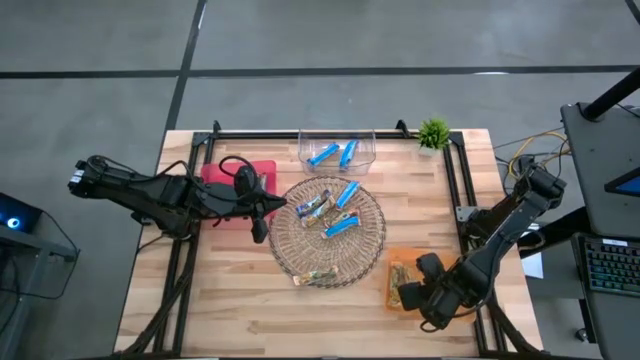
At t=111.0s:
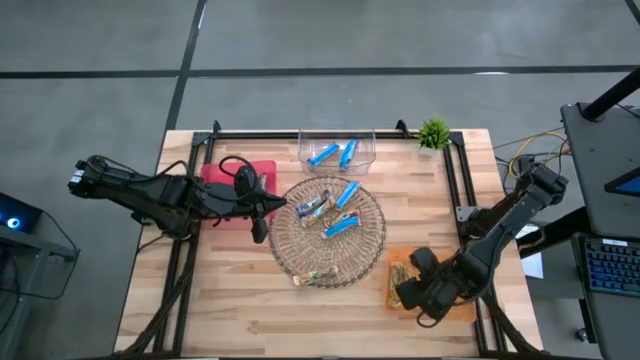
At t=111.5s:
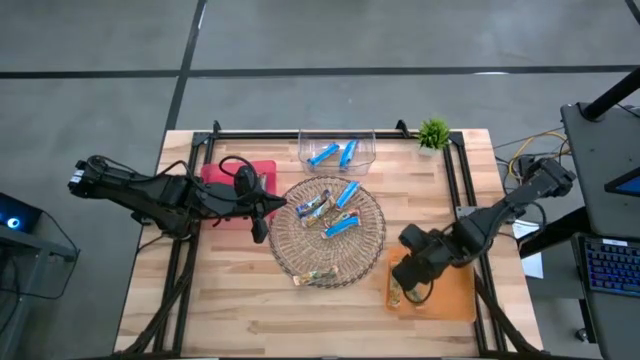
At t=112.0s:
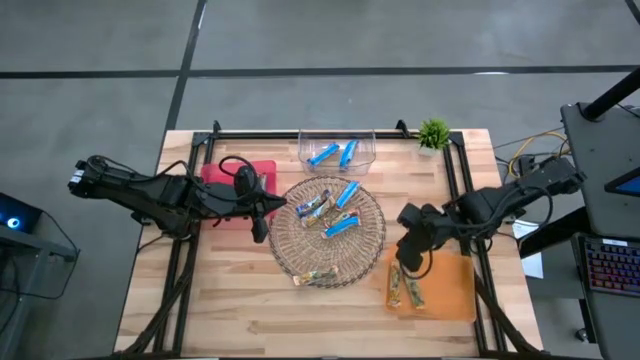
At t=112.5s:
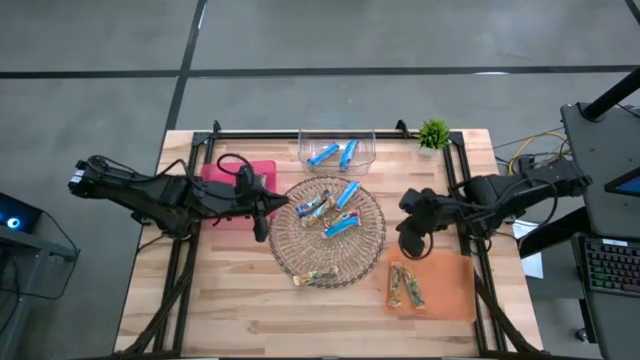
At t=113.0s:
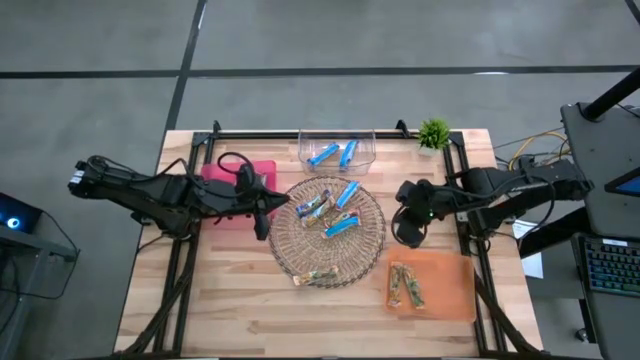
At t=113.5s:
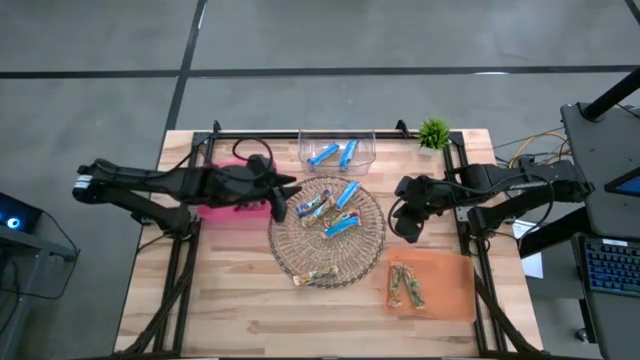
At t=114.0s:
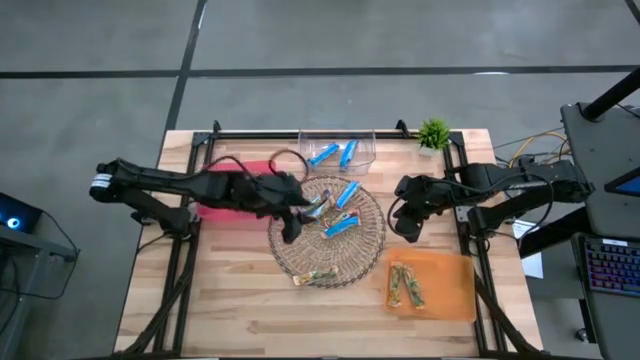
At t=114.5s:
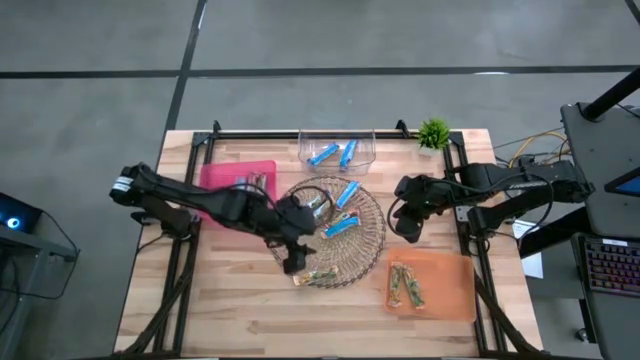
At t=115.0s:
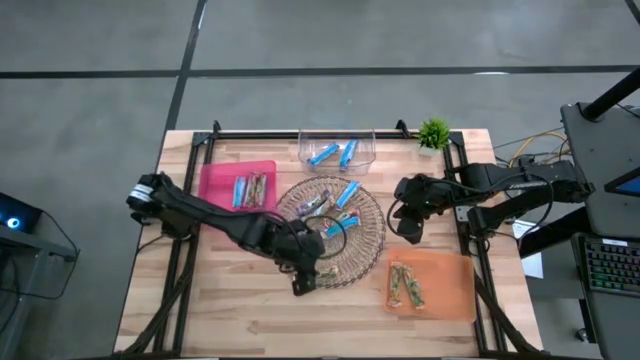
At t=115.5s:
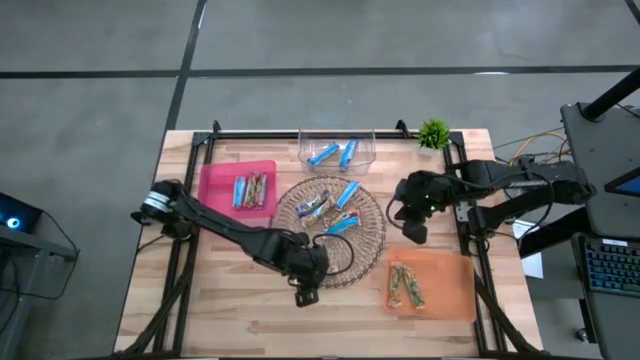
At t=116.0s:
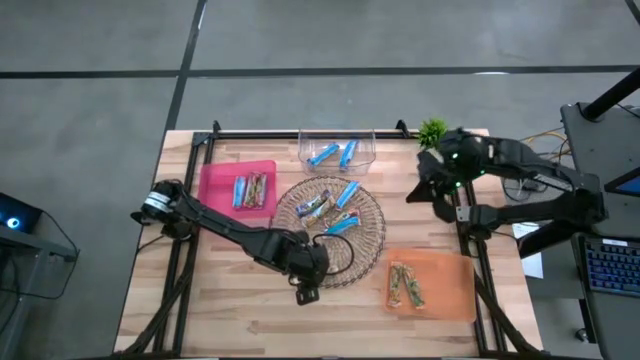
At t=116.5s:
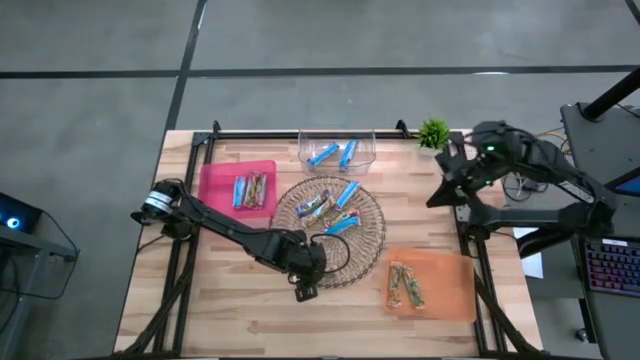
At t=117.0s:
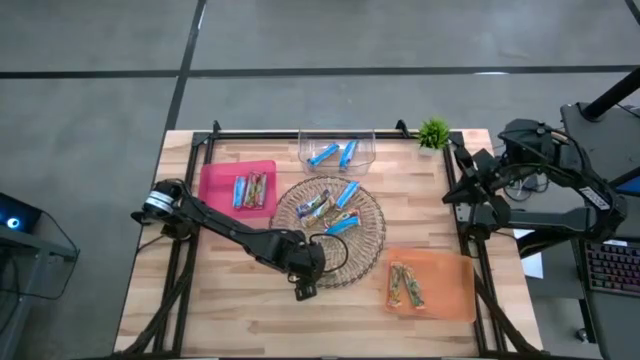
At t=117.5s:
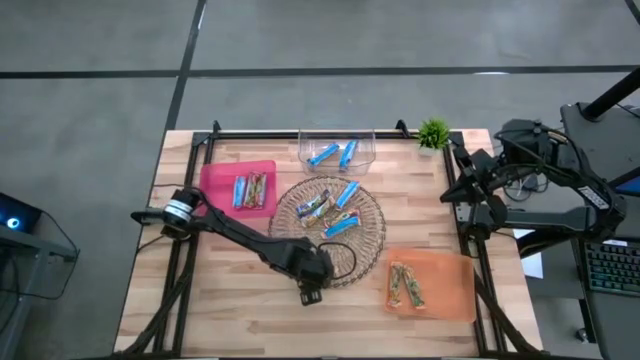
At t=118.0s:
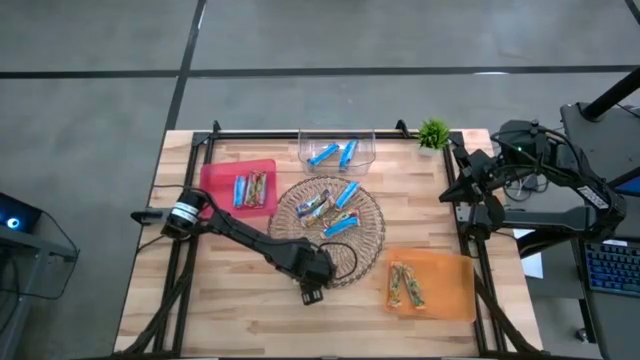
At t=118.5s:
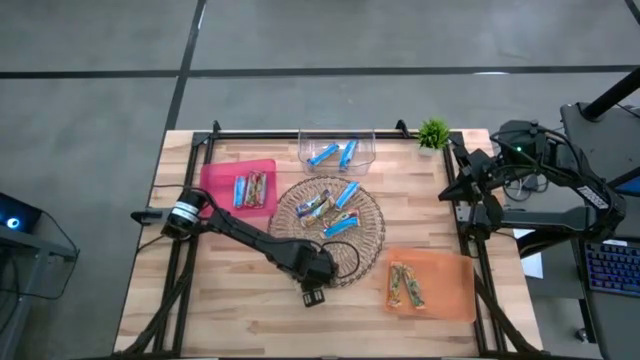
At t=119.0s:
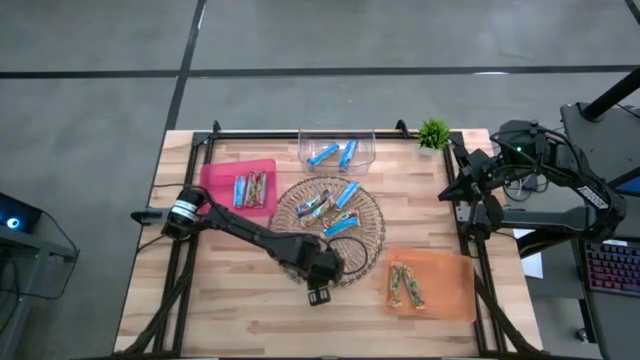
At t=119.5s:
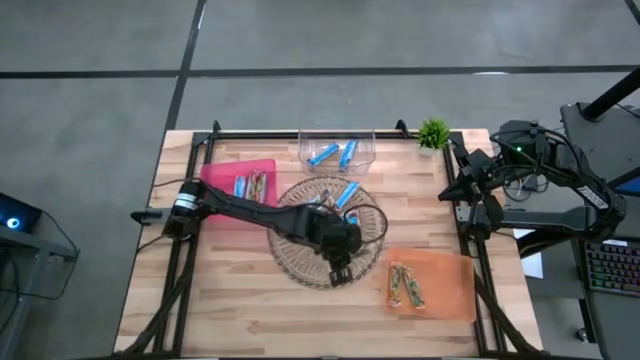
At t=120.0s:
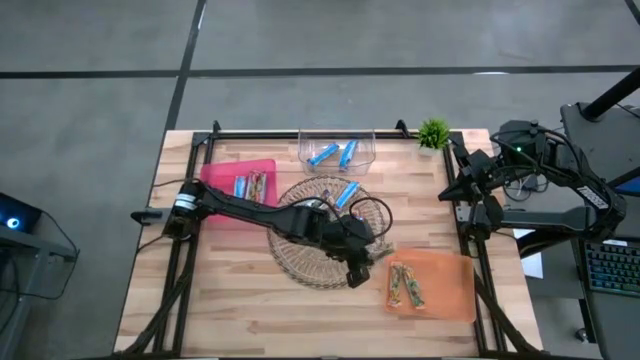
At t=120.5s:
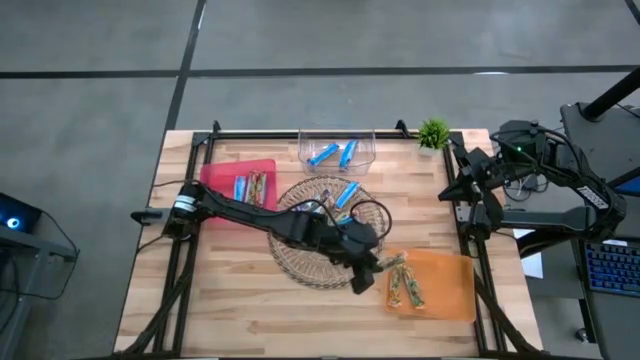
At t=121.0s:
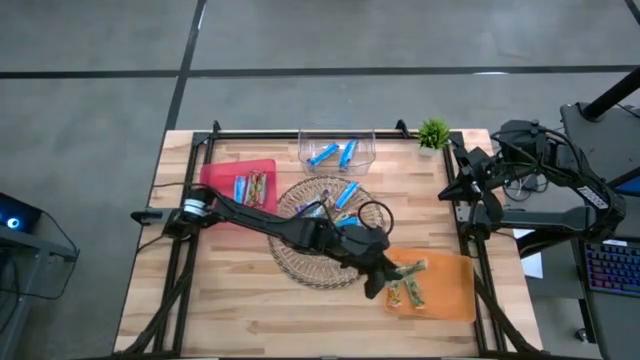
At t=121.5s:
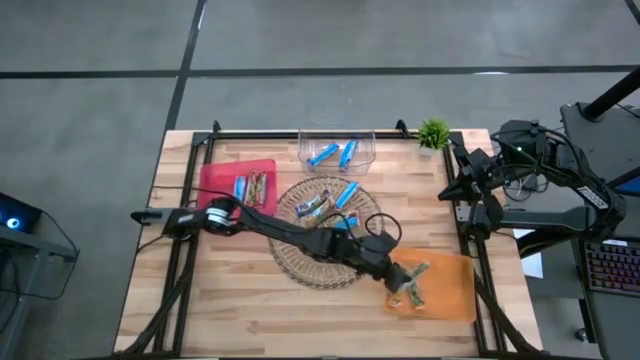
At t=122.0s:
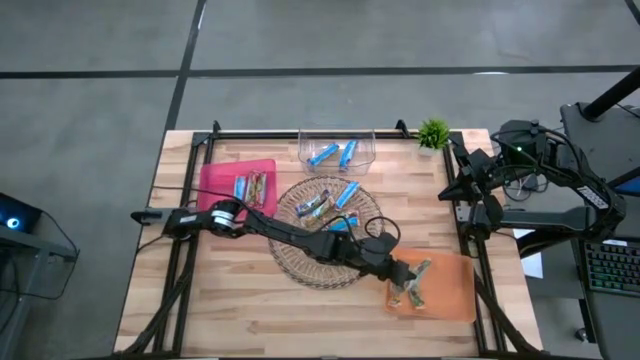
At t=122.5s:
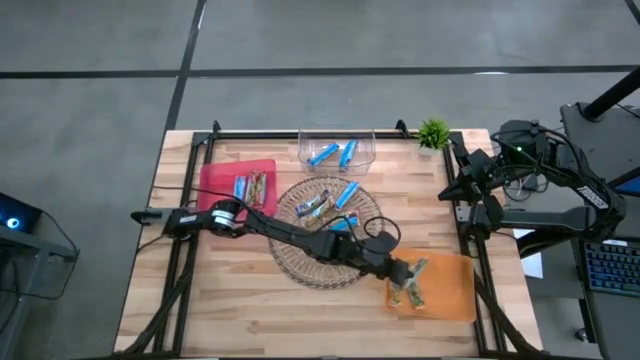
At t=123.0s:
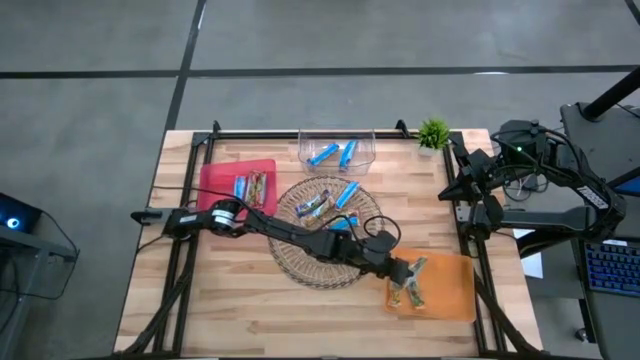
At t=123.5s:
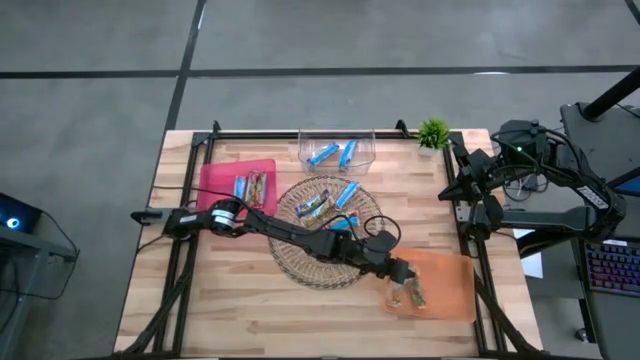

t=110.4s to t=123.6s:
Task: Pick and place Granola Bars by type
Put the yellow granola bar into the orange bin

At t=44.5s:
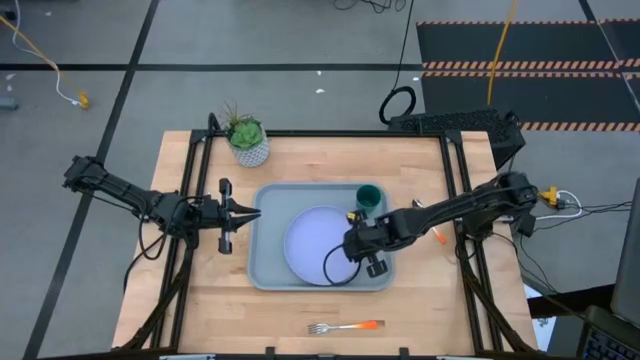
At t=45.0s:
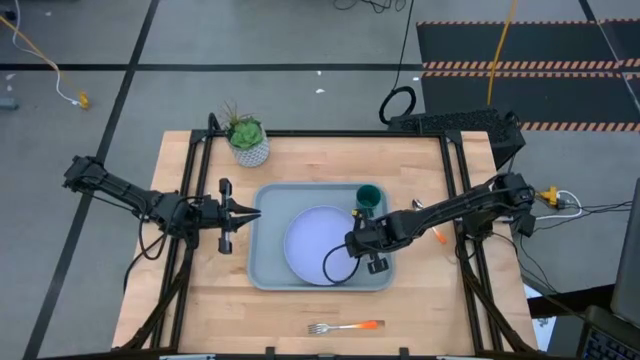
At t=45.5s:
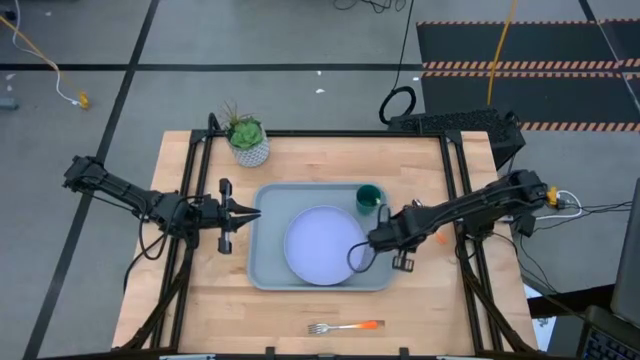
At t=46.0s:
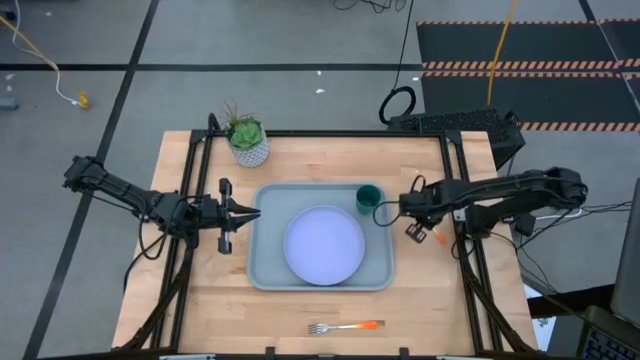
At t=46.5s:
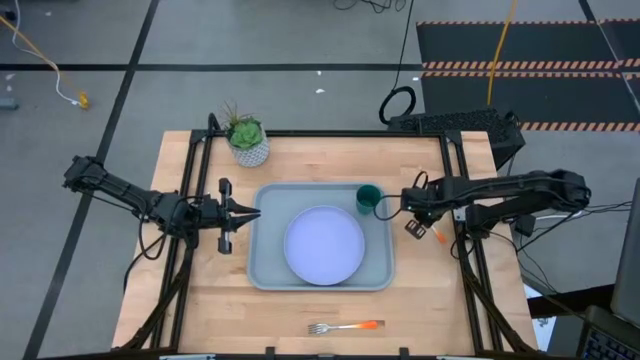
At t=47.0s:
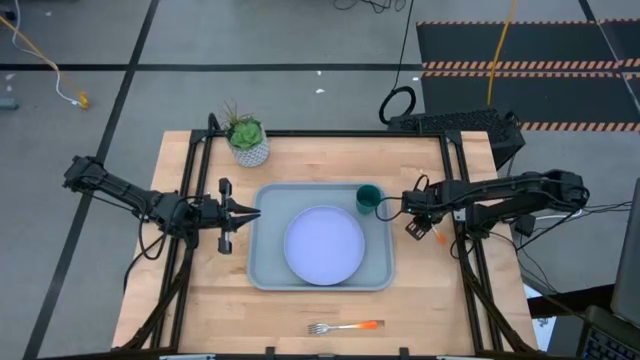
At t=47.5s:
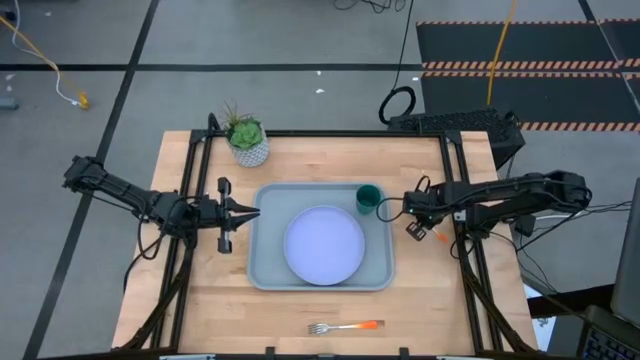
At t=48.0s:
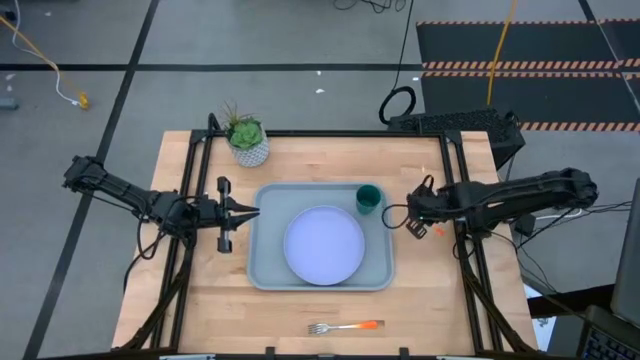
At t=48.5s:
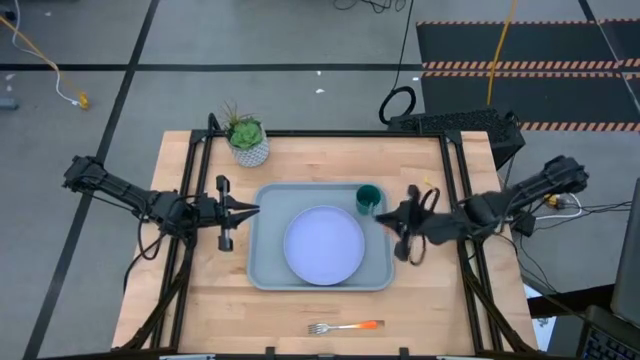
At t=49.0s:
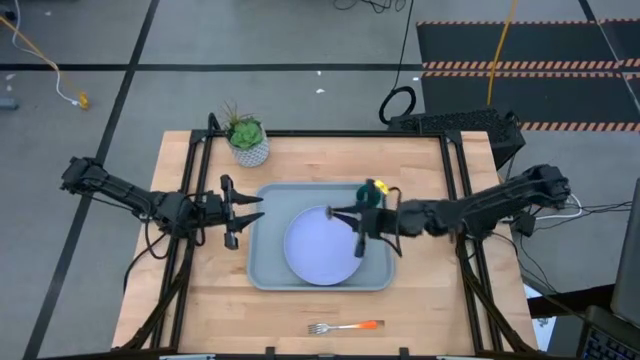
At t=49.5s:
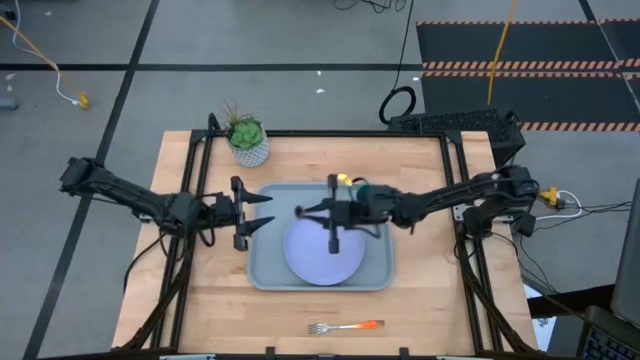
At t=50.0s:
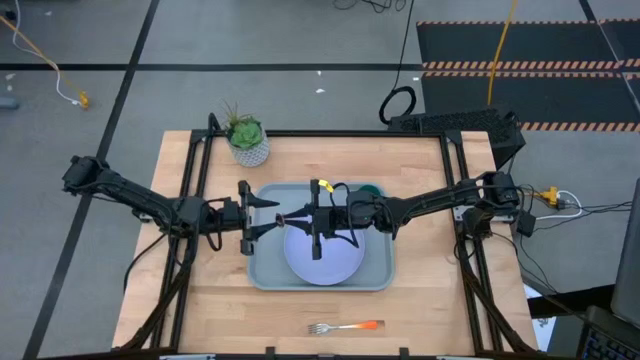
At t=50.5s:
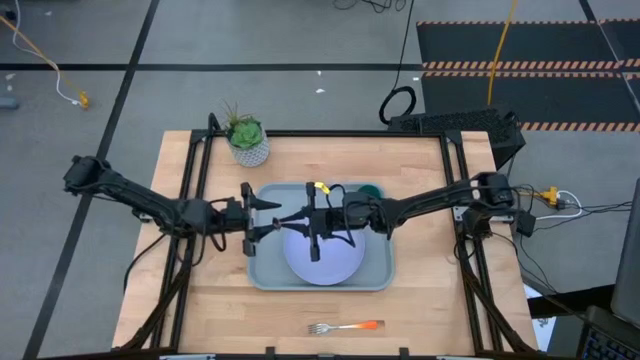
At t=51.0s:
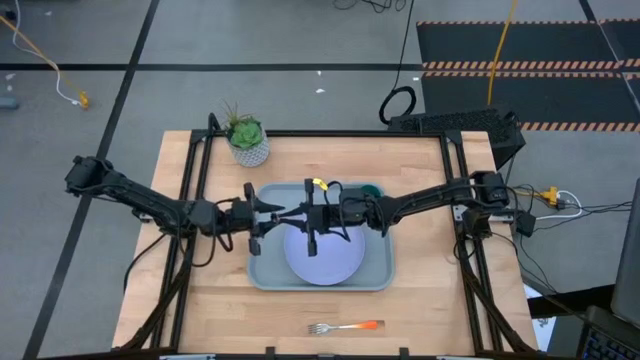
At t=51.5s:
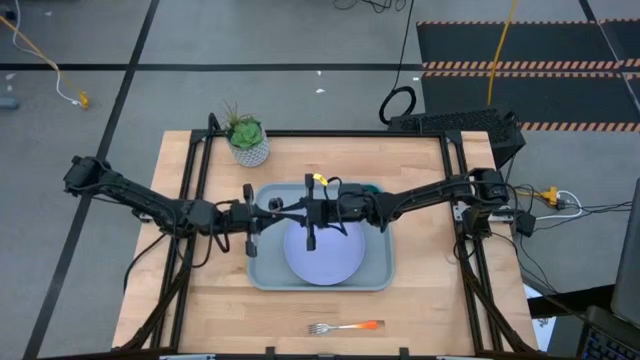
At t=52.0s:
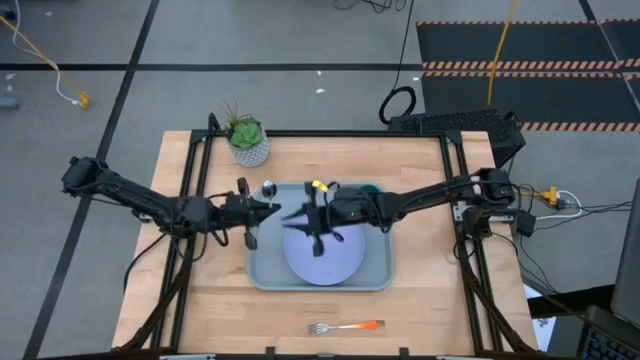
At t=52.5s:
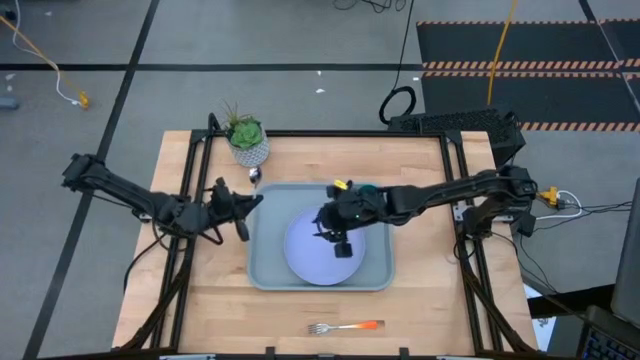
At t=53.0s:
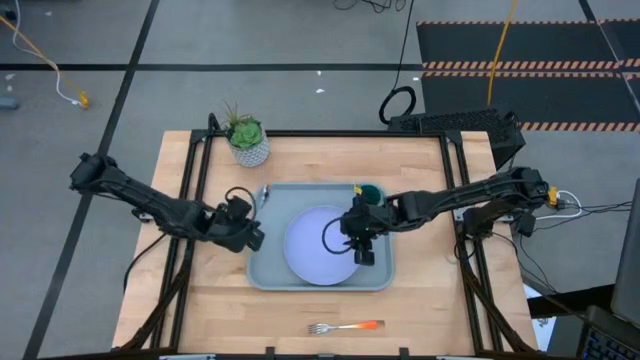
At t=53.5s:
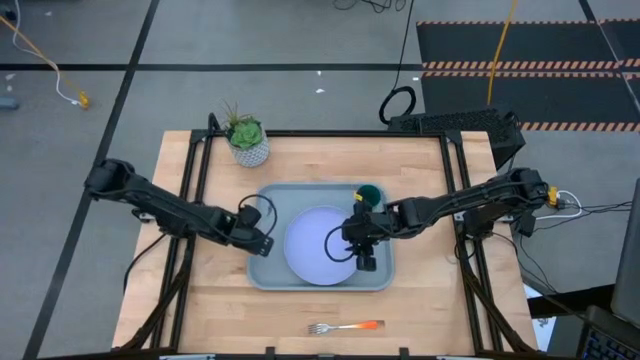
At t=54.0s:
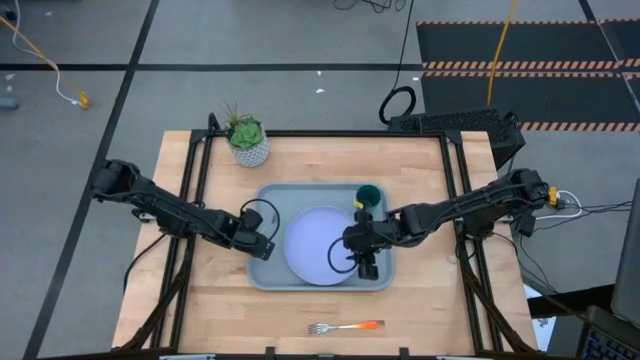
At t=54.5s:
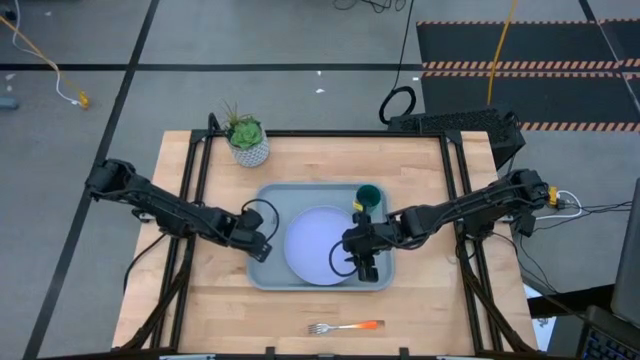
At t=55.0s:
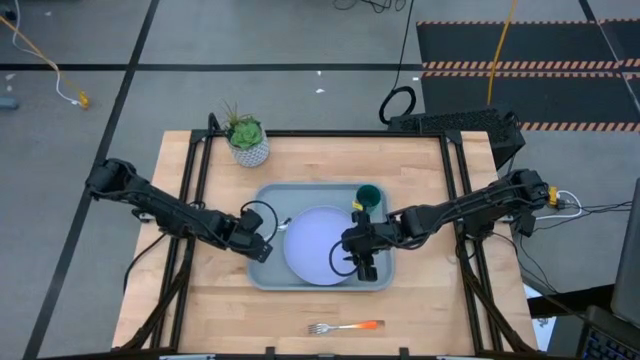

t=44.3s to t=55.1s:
Task: Pick and place plate/cup/fork/spoon on tray
Put the orange spoon to the left of the blue plate on the blue tray
